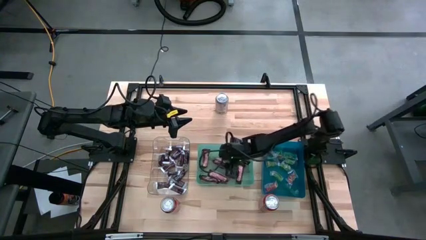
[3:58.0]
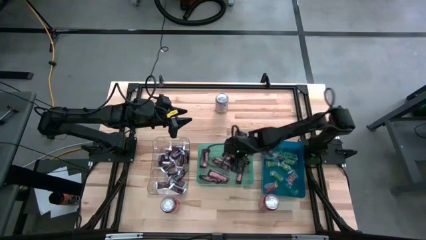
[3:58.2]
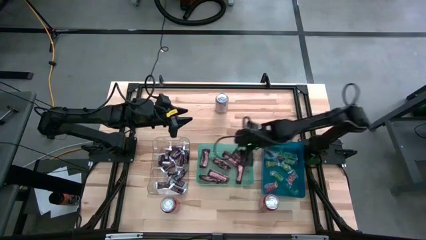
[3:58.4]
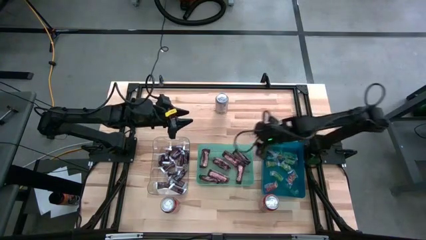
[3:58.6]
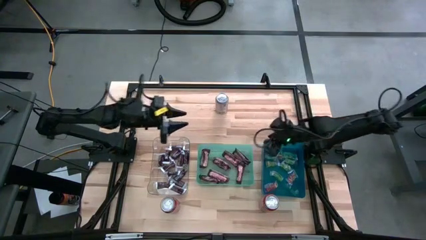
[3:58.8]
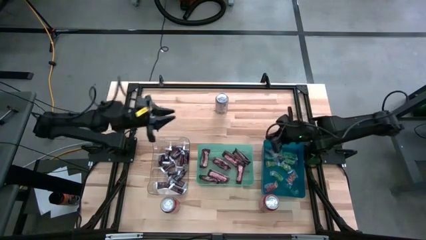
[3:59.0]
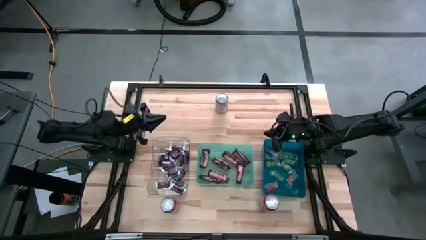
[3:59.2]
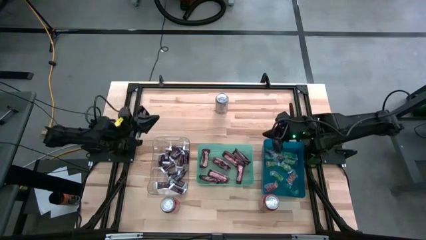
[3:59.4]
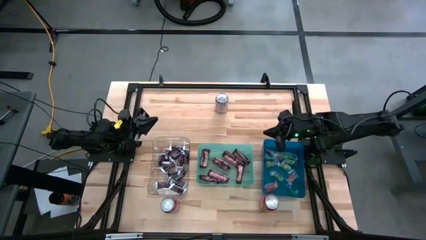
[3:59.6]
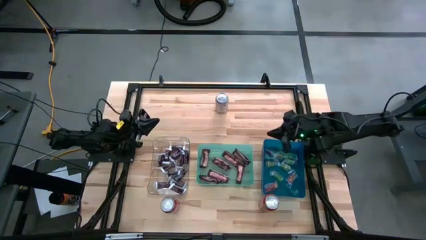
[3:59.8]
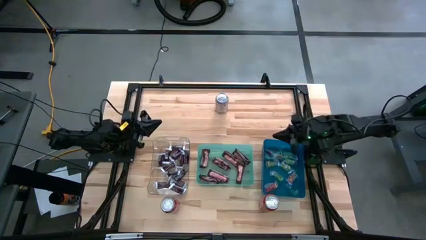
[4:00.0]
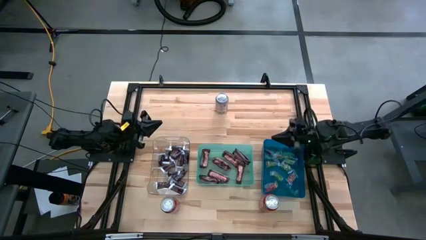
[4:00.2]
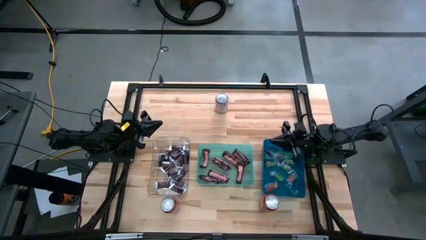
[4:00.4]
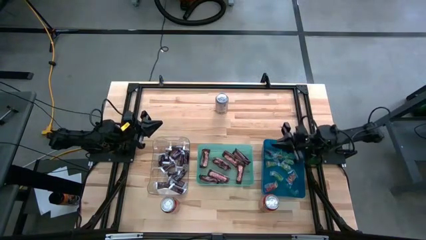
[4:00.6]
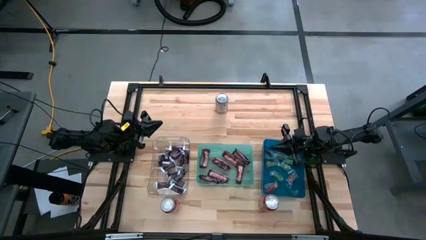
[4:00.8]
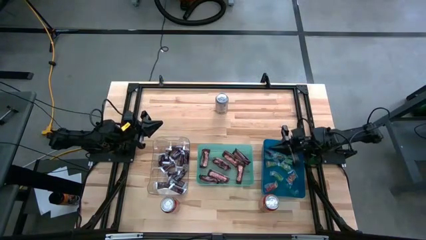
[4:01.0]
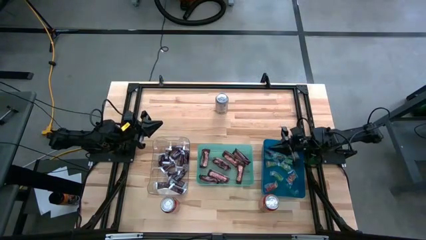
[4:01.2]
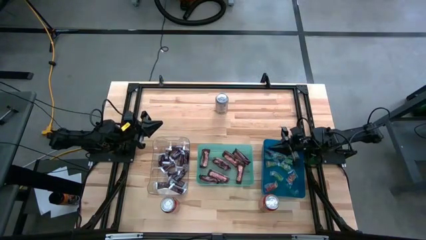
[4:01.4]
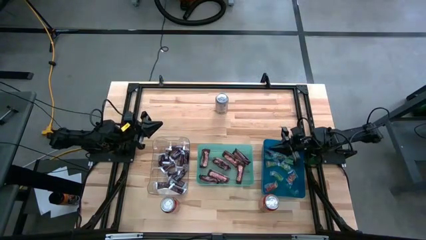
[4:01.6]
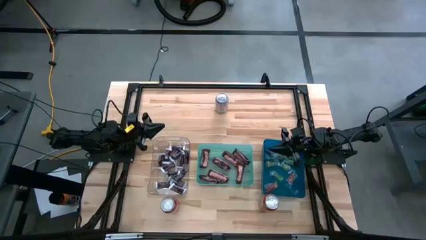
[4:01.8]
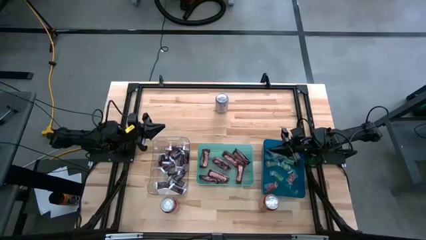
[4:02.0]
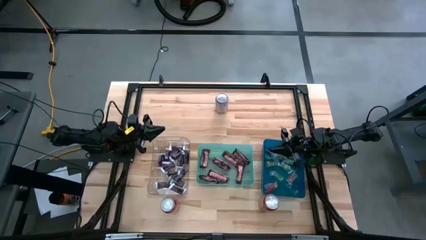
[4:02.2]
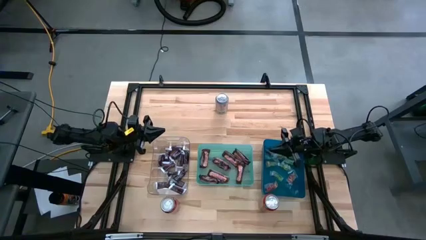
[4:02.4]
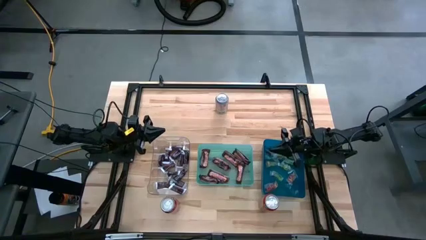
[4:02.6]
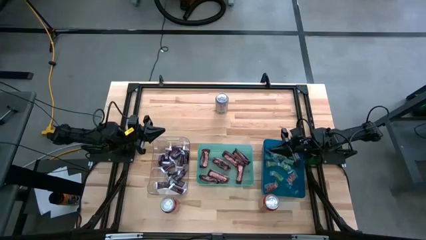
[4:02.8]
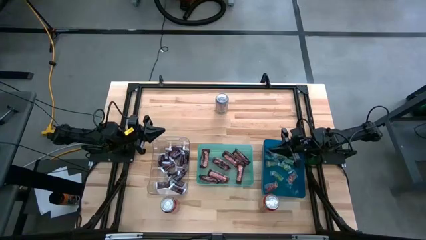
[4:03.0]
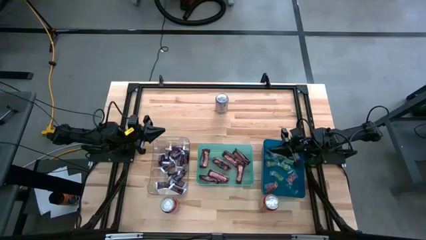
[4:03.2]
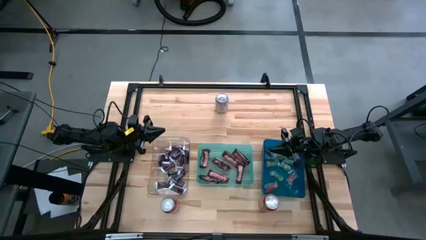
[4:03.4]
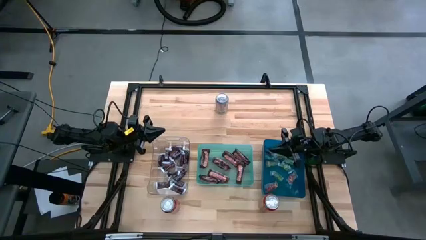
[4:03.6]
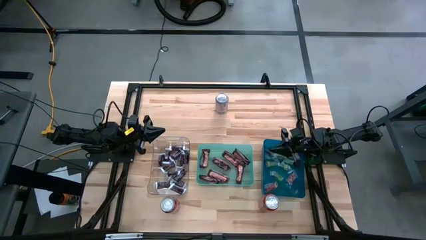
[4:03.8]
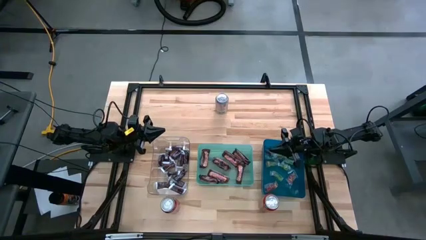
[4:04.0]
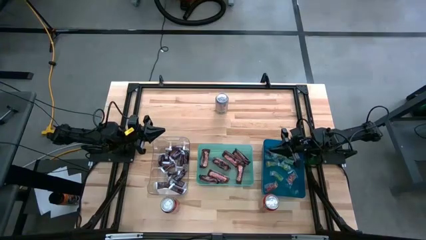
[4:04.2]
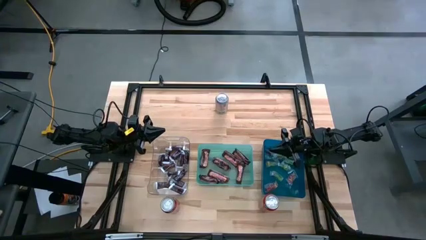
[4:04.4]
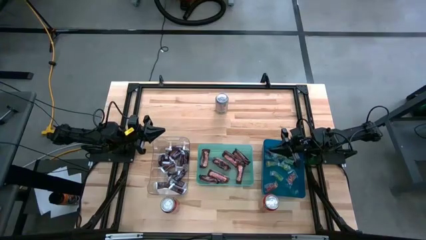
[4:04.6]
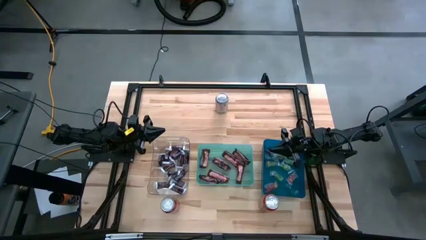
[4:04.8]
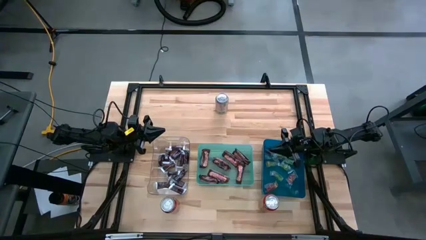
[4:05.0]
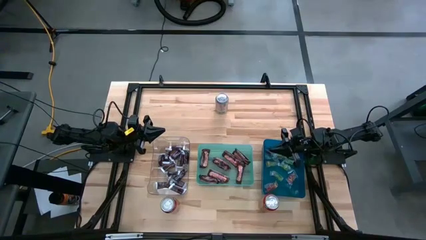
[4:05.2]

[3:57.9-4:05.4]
Task: Organize candy in baskets
Return to Home Position

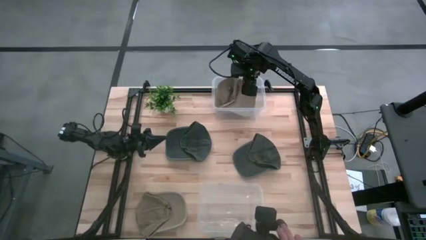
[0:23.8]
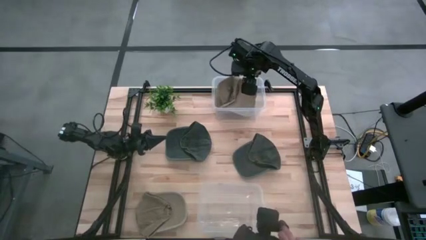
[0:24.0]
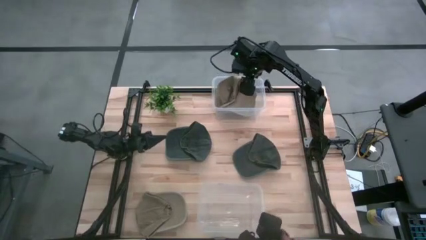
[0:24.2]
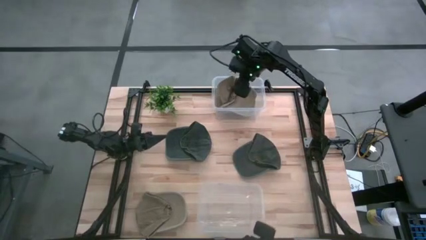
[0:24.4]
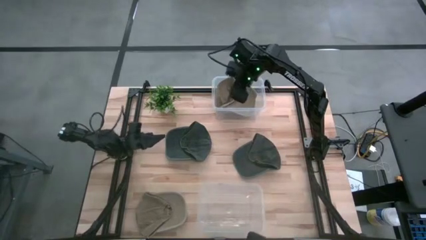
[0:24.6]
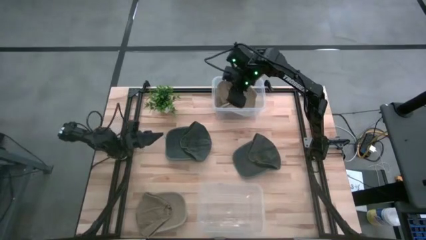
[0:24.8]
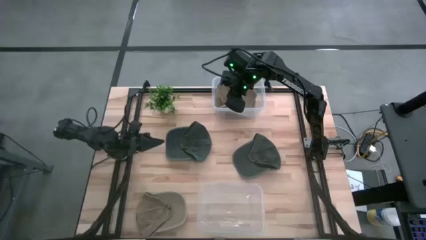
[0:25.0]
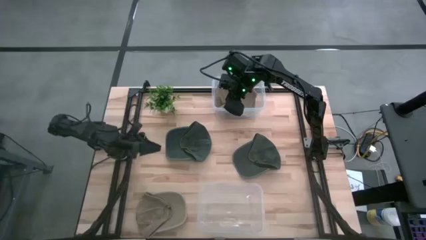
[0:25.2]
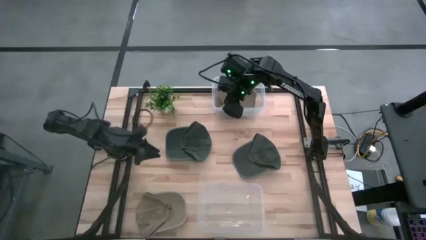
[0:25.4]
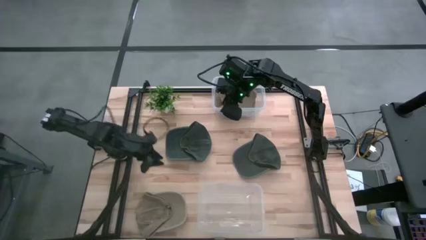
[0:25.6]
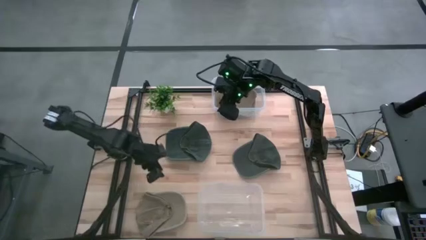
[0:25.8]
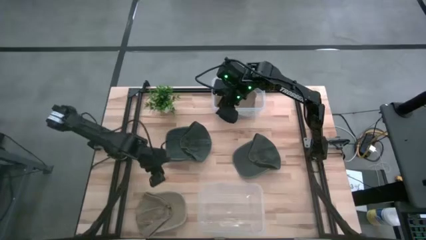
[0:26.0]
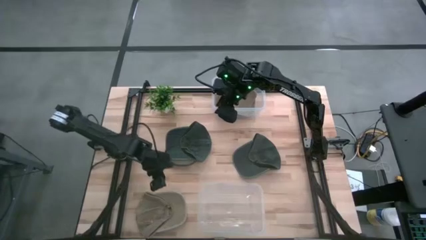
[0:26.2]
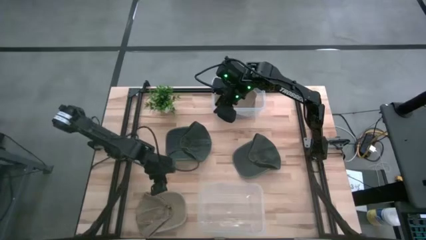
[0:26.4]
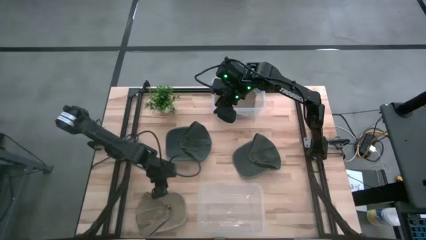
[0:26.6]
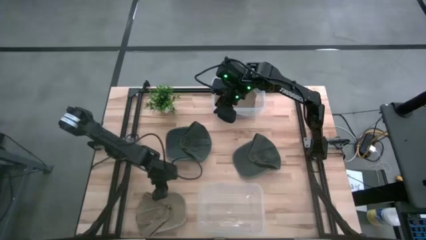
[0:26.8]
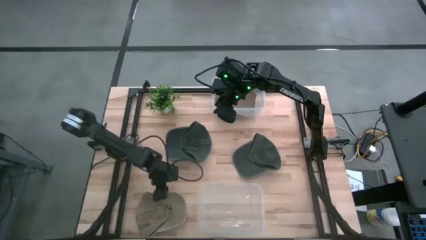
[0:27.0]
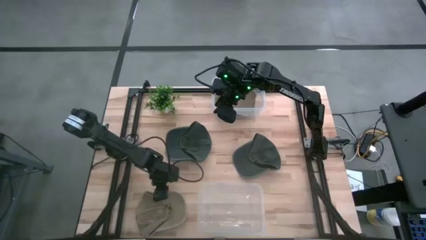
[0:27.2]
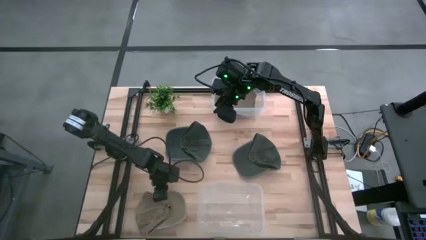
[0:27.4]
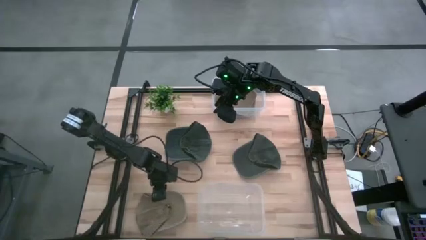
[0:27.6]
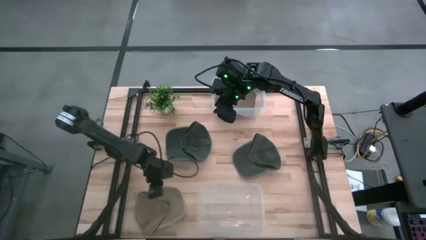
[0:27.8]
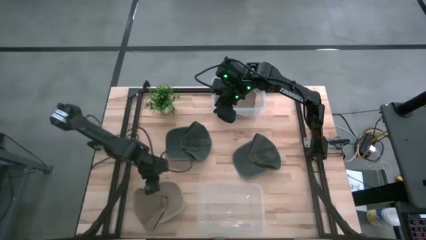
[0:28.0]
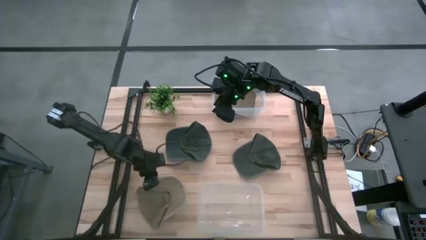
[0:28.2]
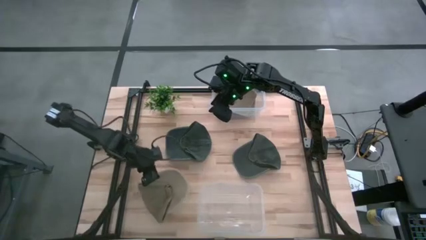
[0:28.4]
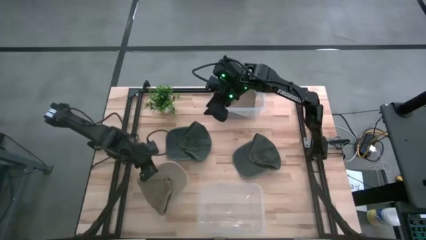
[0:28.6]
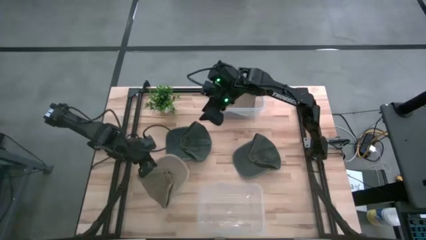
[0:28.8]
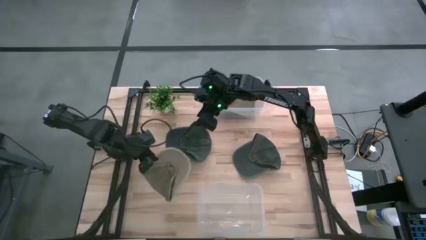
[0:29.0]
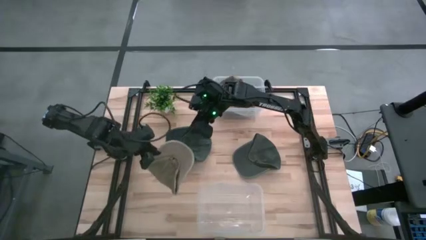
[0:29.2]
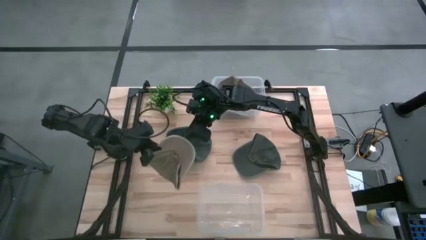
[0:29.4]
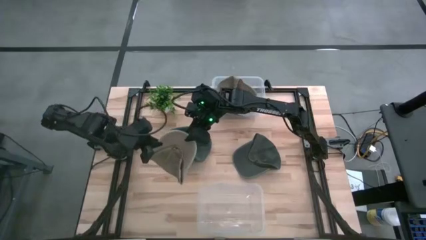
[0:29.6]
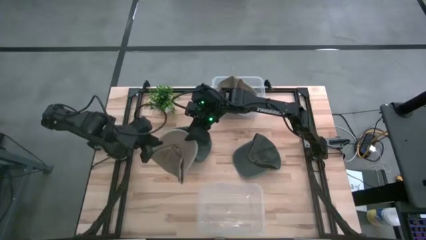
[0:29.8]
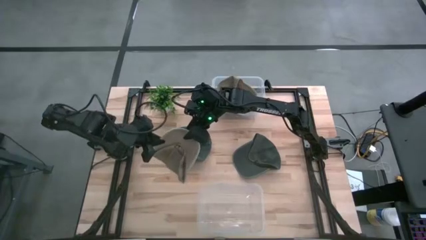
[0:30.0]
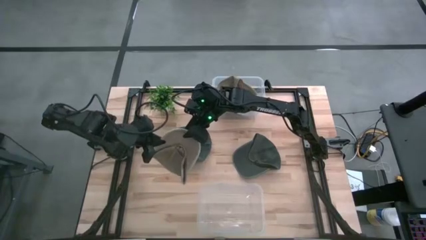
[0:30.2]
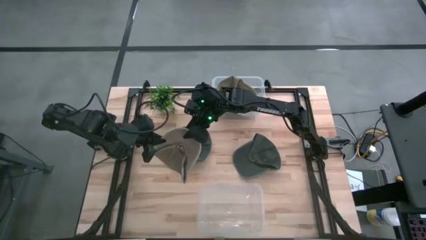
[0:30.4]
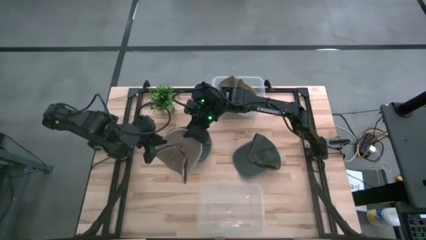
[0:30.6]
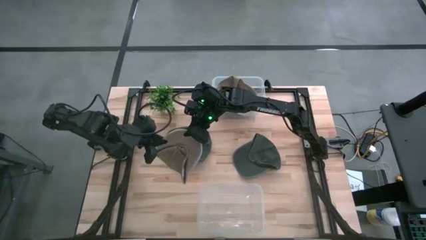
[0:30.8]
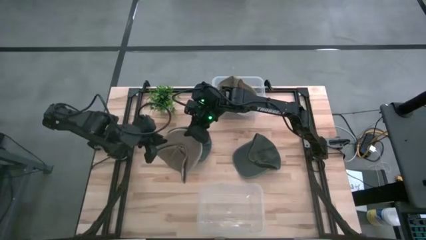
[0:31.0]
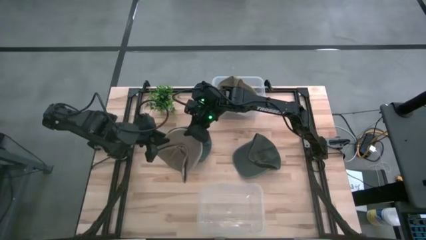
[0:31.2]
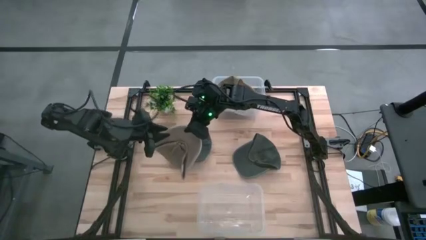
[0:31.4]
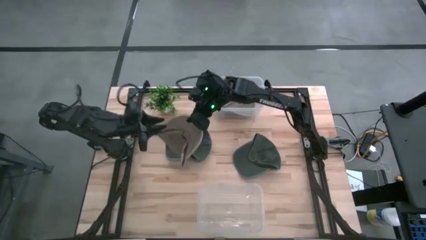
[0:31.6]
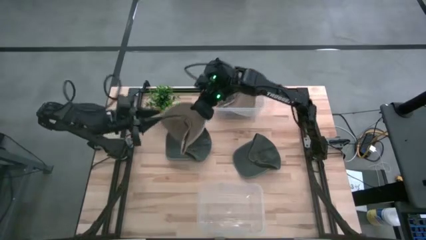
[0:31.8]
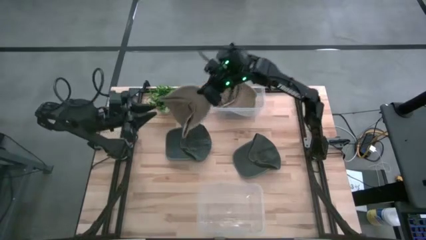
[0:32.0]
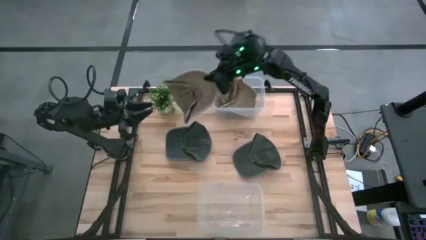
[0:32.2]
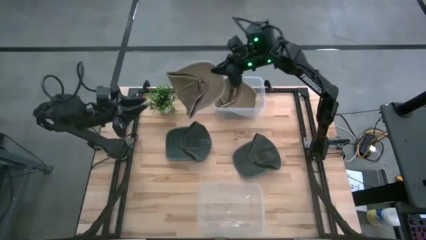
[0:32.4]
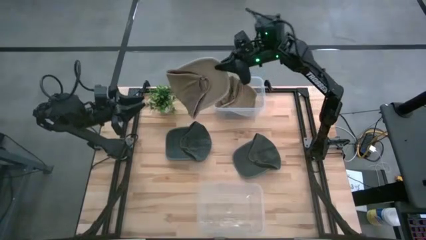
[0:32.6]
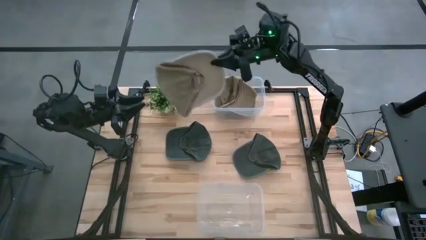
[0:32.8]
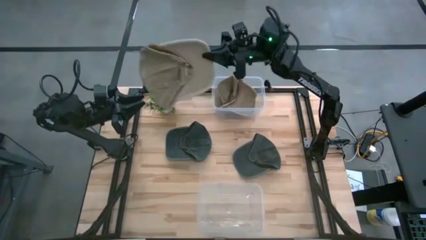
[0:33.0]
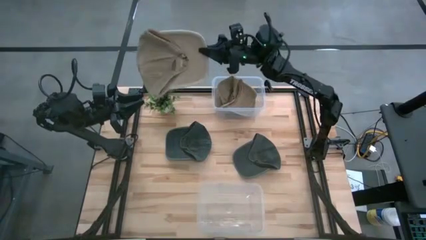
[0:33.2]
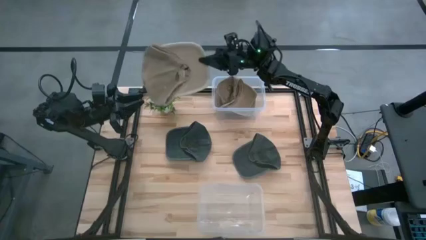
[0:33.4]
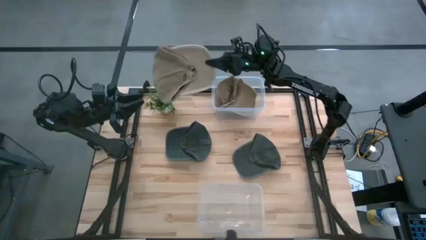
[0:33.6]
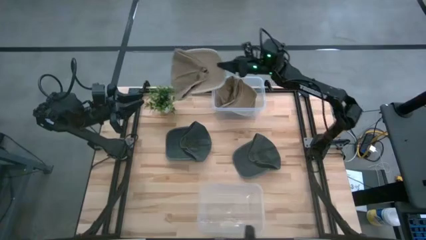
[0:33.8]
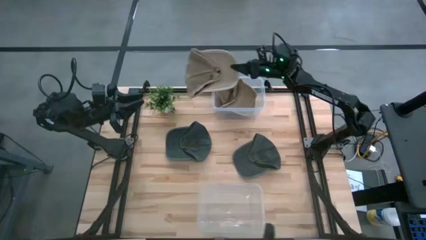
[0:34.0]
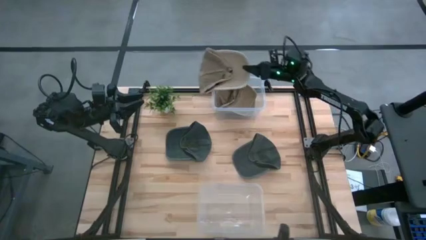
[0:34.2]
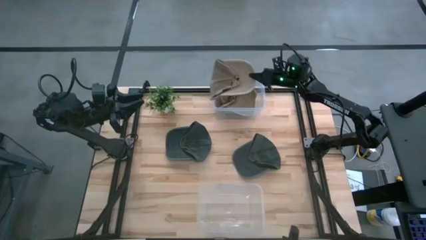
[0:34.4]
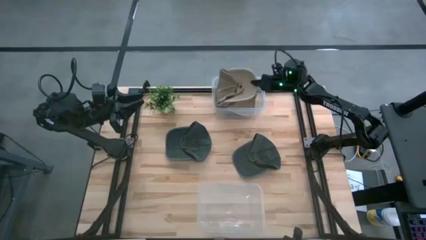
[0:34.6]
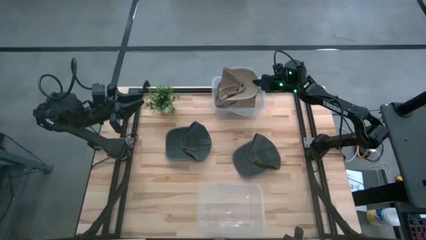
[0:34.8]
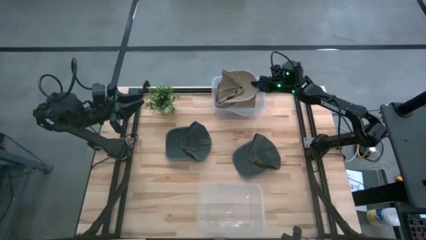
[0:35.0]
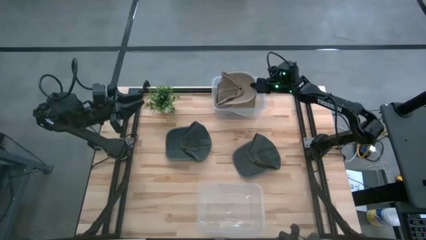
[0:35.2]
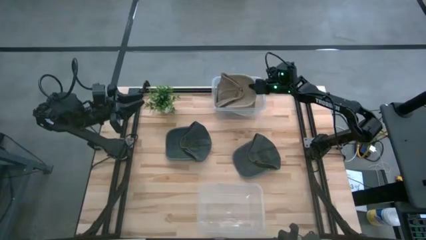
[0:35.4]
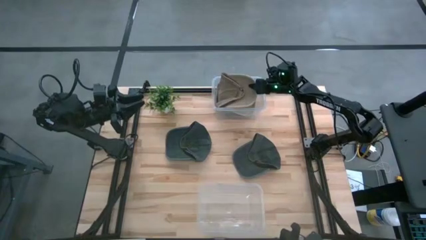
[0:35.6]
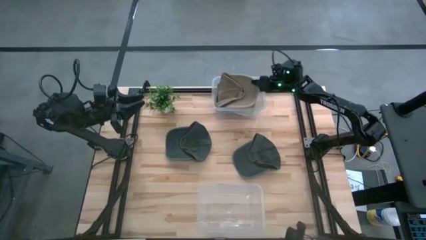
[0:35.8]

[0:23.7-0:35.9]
Task: Pick & Place hat
Put the brown cap into the top transparent bin
